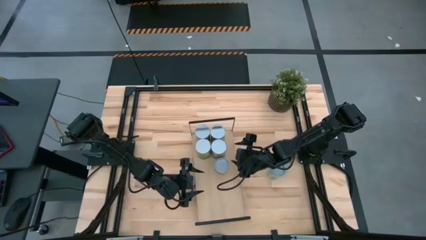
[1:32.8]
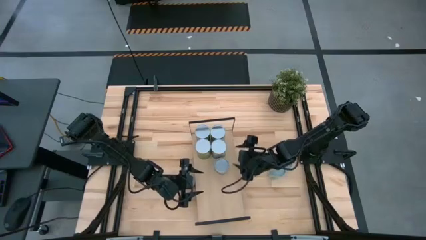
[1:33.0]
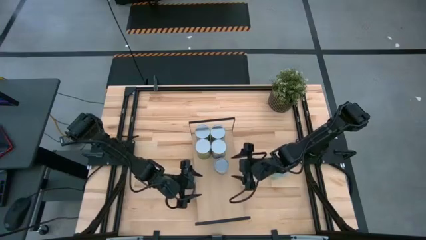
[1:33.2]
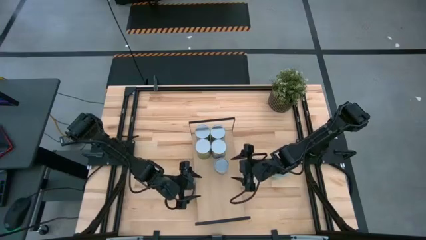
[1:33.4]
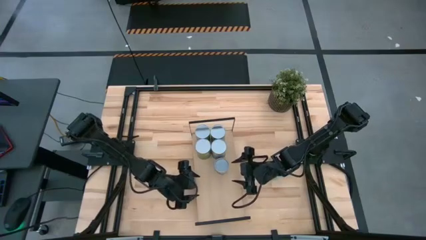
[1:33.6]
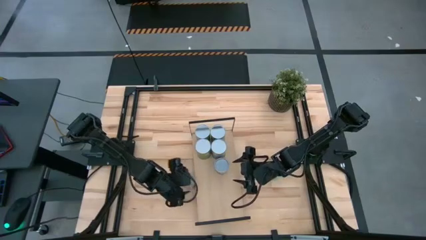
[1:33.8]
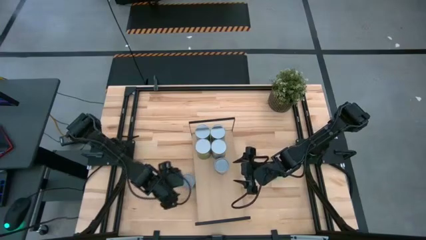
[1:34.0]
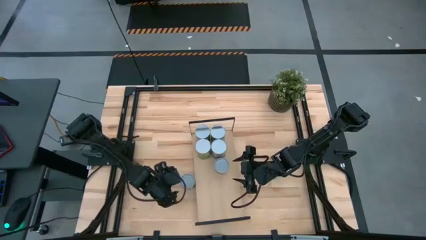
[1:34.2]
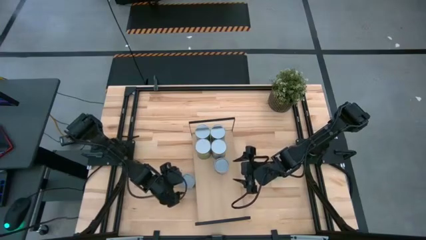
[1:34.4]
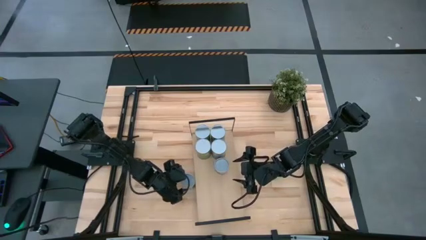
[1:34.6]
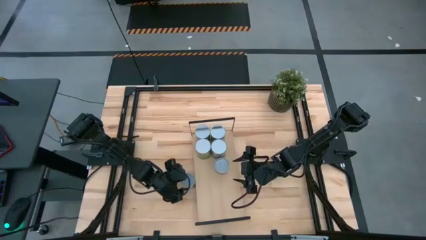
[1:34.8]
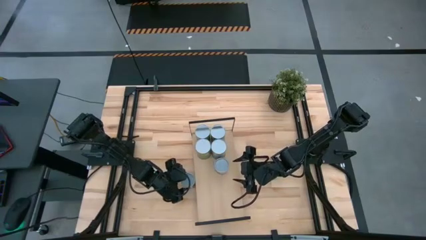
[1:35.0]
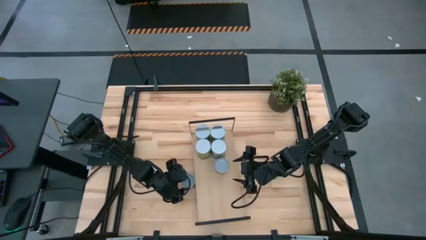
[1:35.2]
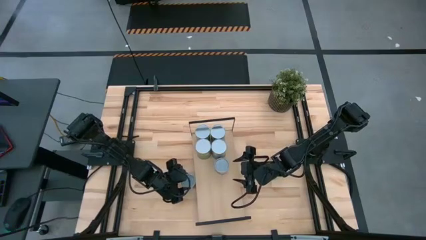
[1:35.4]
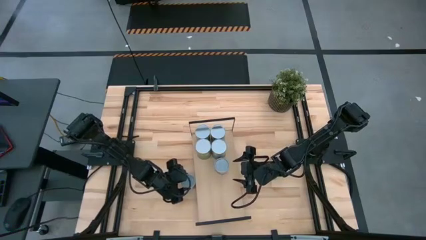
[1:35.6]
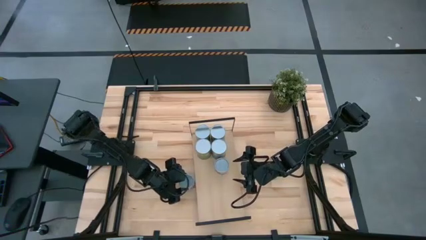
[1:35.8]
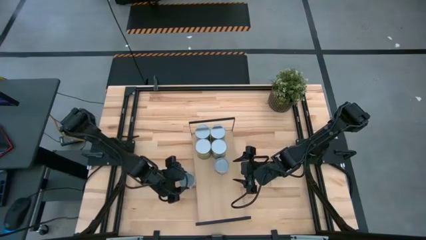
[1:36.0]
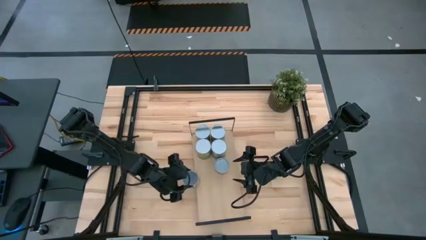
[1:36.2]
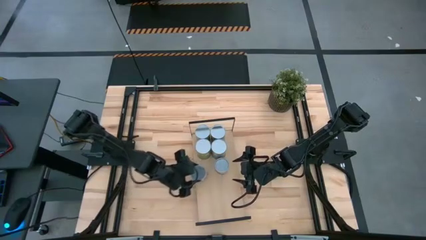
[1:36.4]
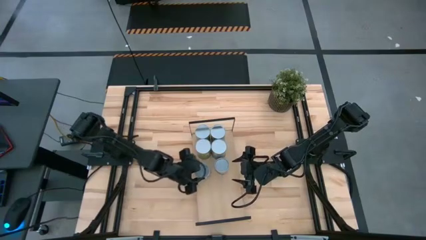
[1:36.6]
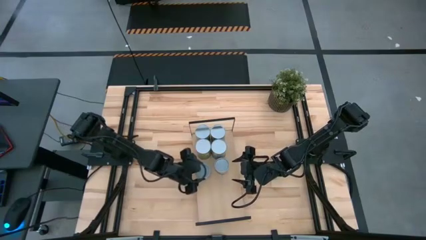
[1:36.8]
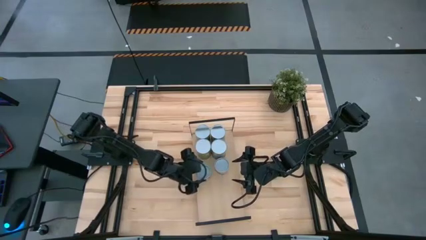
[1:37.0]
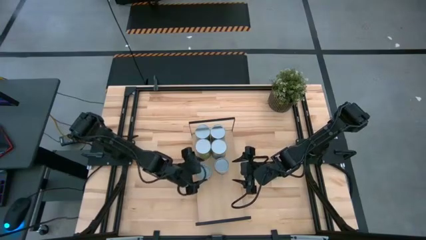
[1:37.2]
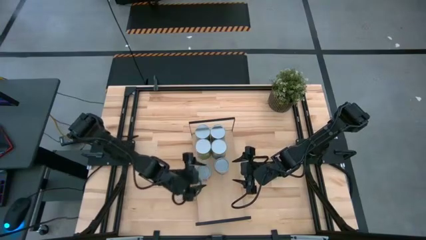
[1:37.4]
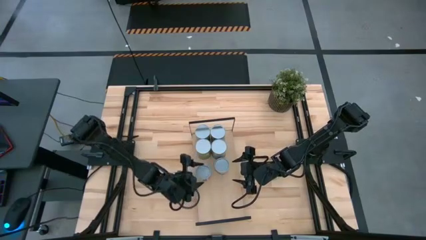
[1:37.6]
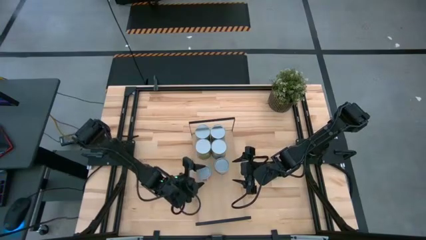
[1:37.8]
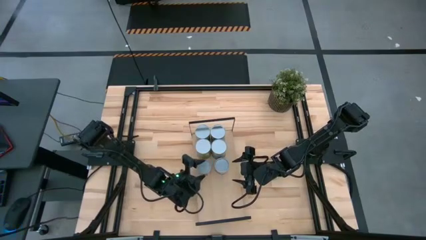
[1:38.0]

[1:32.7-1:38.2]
Task: Pick and place cans onto a shelf
Put the small canned tomatoes on the shelf

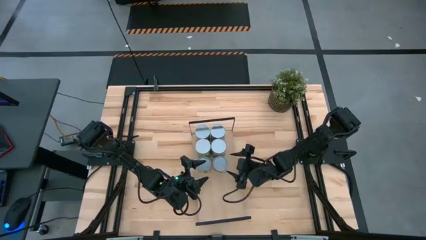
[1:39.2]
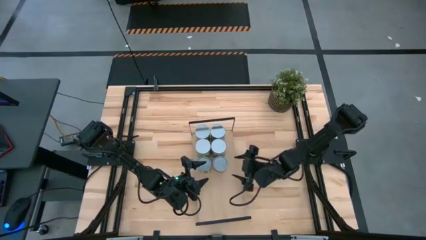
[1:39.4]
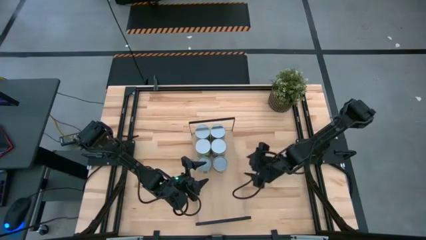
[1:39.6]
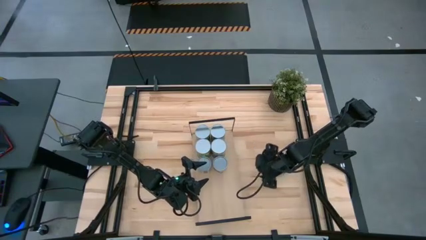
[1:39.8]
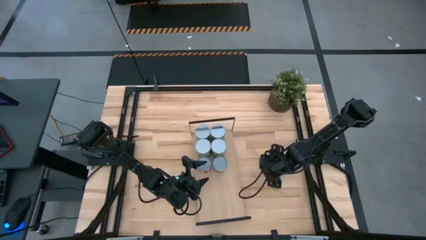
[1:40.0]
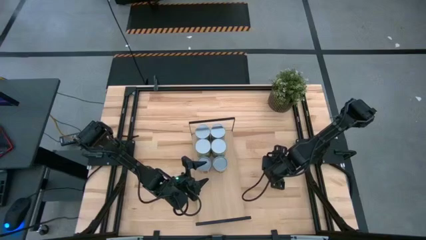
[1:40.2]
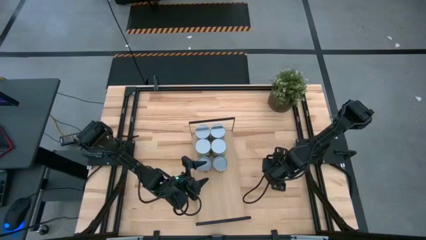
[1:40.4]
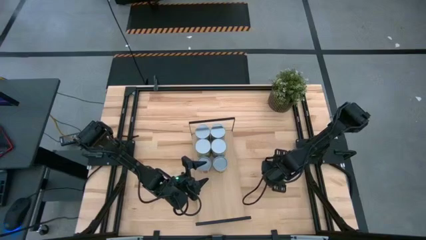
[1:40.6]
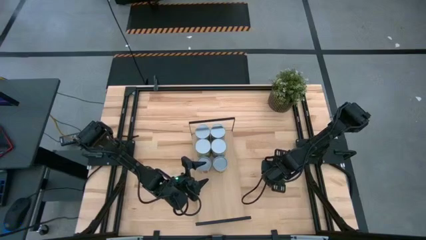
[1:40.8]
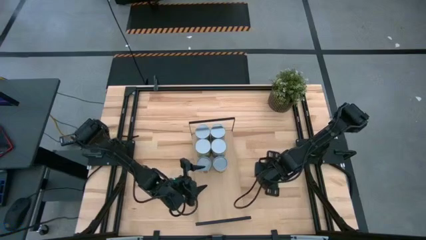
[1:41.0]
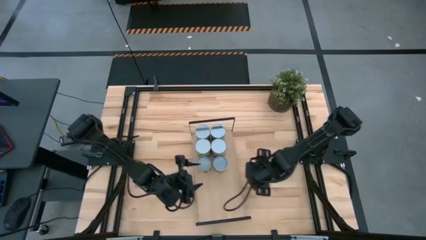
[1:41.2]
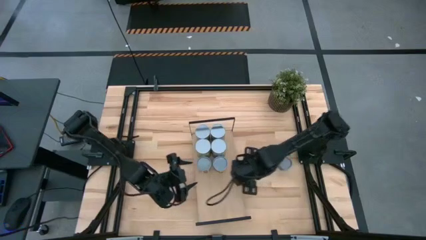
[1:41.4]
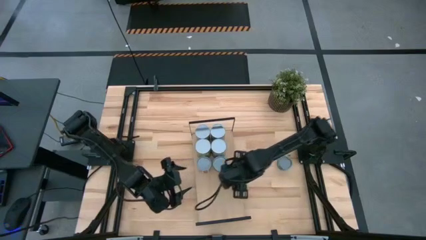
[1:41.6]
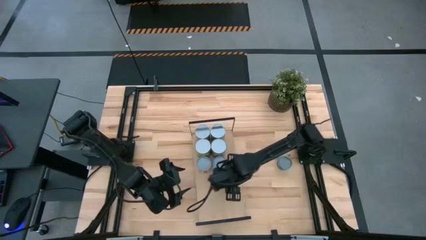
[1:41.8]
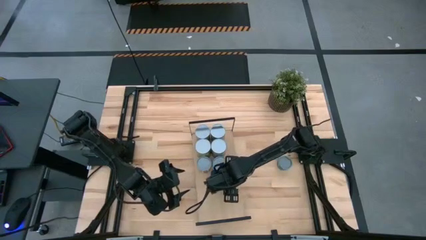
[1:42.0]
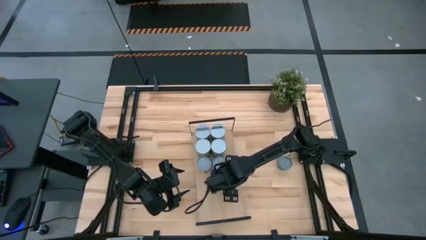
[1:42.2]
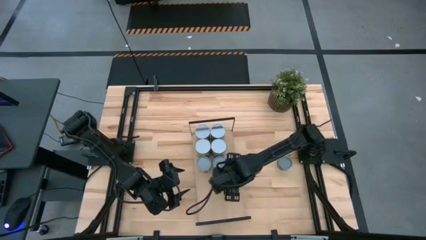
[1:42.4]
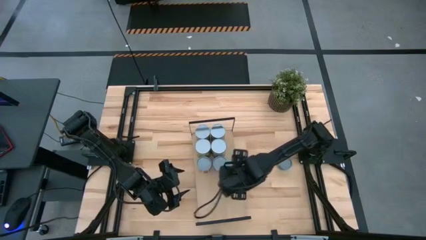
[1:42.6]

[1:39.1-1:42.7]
Put the large canned mixed vegetable on the shelf

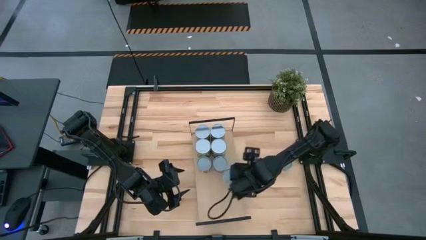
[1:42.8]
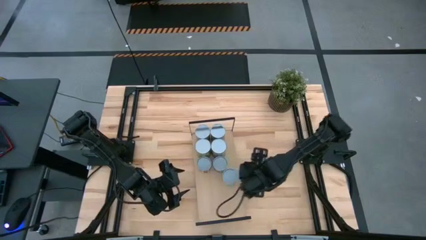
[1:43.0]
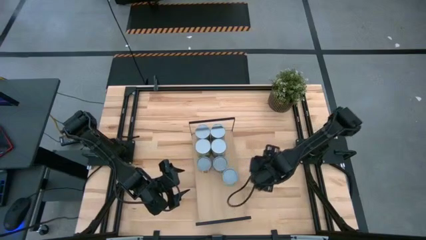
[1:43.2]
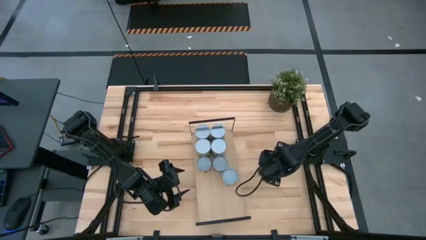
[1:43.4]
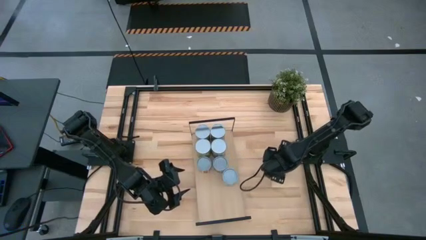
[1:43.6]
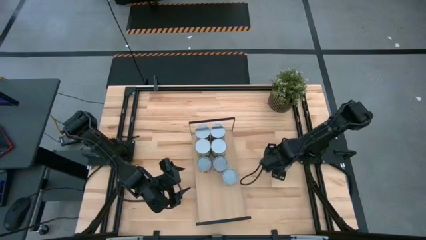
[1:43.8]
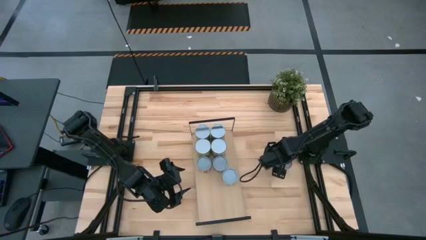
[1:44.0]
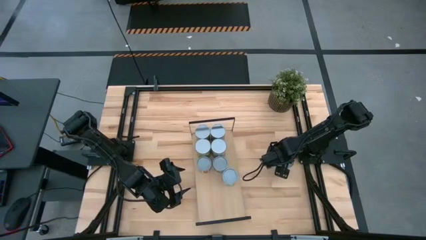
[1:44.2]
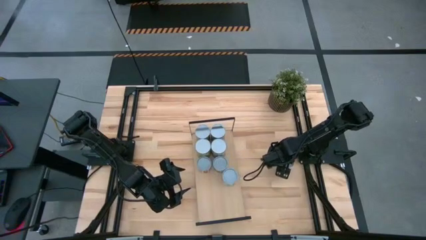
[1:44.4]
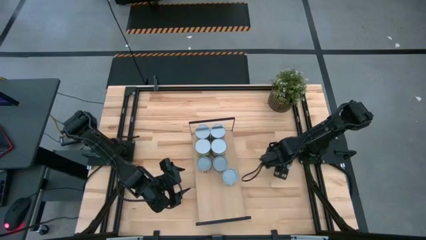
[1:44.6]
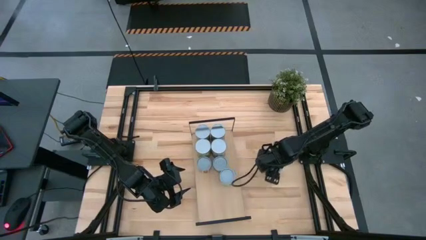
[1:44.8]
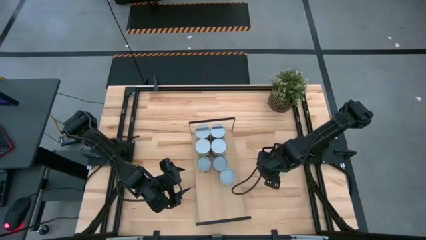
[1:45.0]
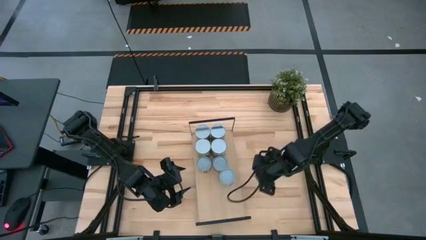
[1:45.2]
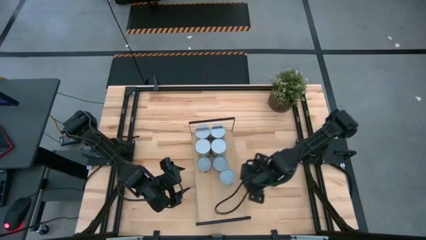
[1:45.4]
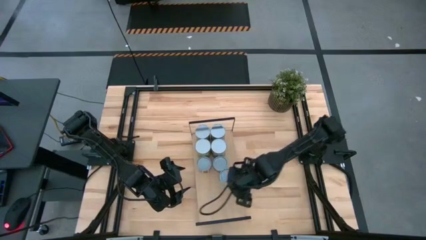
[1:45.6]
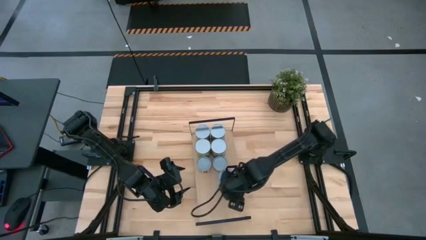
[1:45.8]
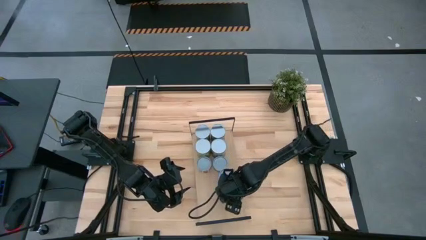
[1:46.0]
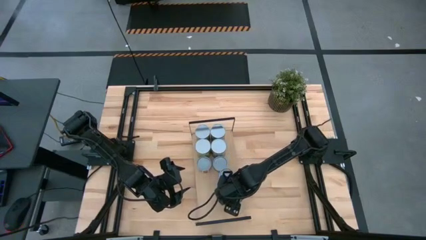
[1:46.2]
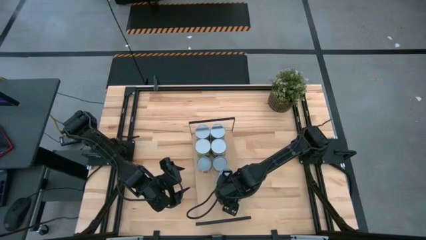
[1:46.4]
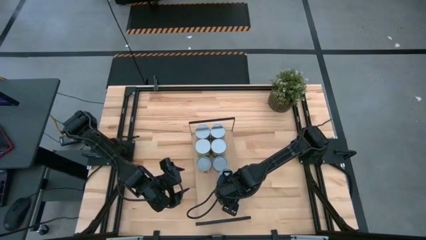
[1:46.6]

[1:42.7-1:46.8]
Put the small canned tuna on the shelf

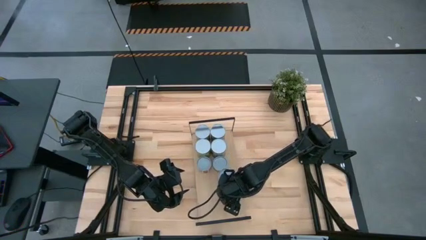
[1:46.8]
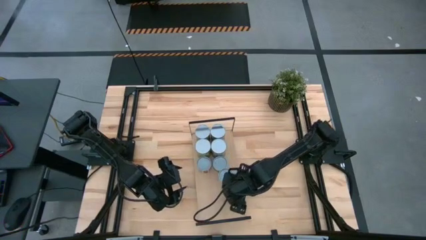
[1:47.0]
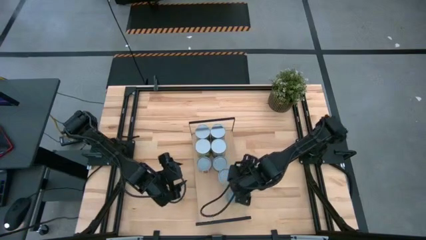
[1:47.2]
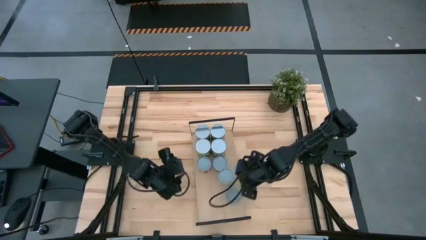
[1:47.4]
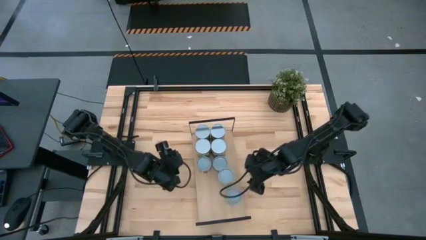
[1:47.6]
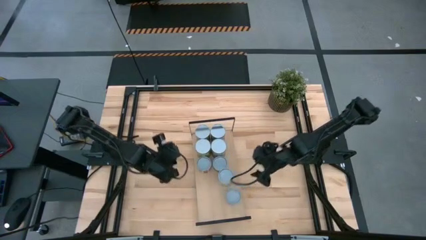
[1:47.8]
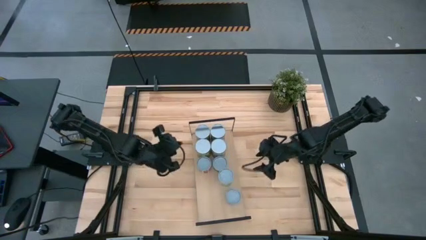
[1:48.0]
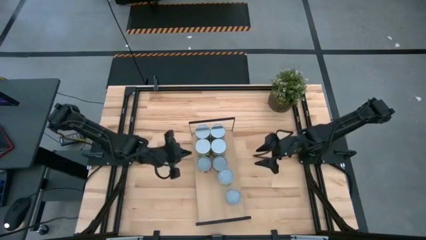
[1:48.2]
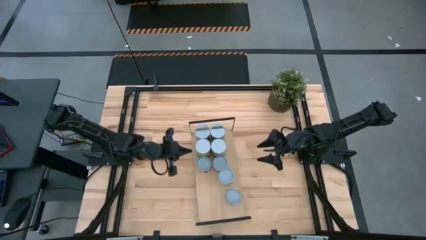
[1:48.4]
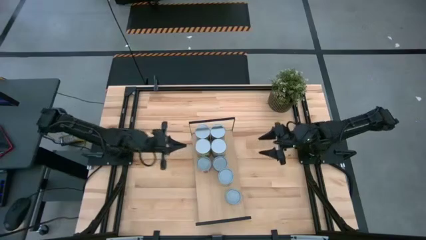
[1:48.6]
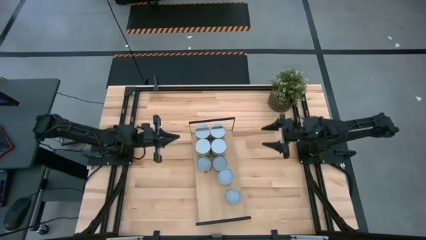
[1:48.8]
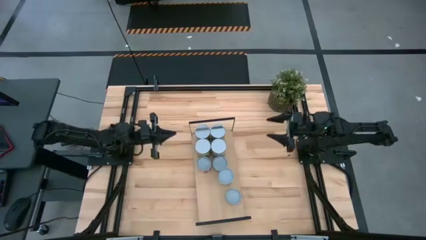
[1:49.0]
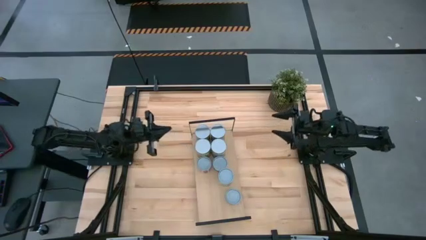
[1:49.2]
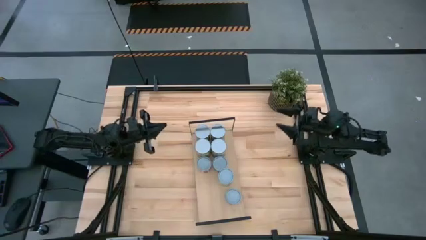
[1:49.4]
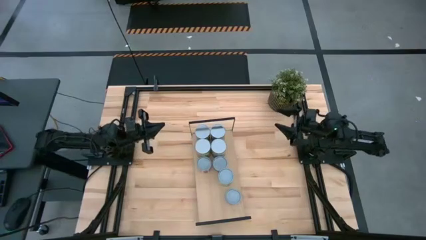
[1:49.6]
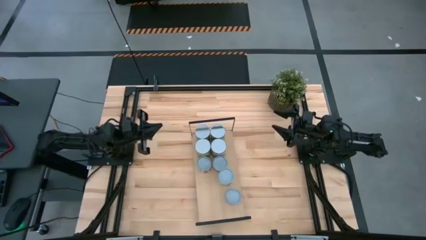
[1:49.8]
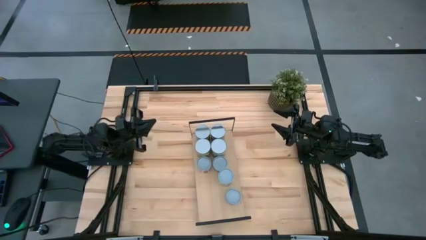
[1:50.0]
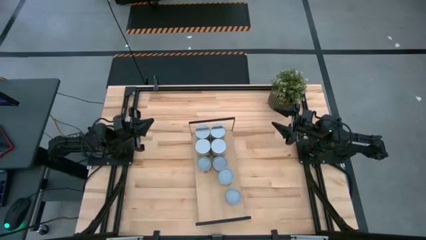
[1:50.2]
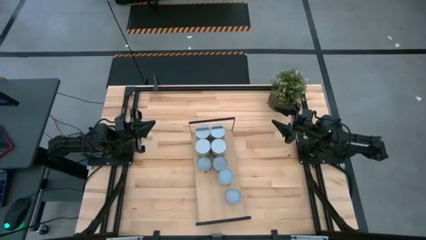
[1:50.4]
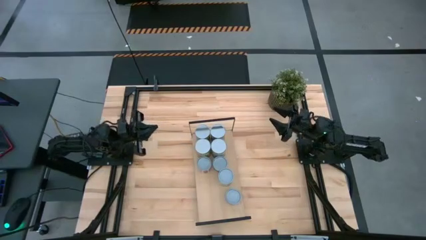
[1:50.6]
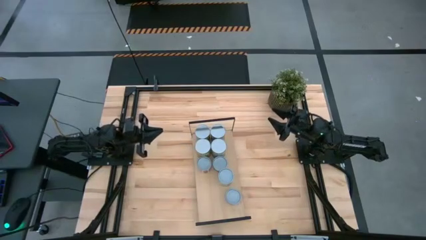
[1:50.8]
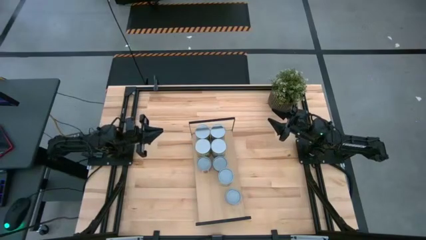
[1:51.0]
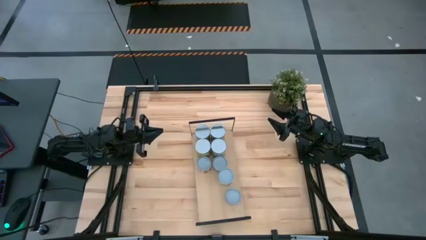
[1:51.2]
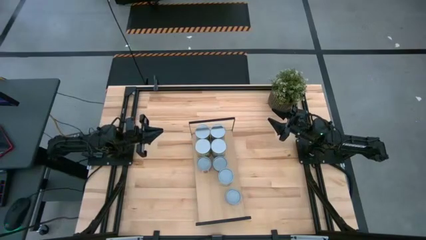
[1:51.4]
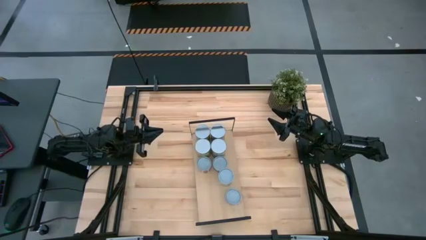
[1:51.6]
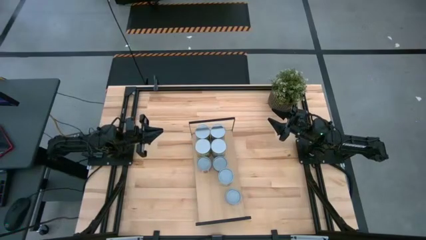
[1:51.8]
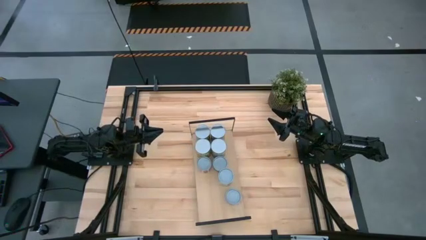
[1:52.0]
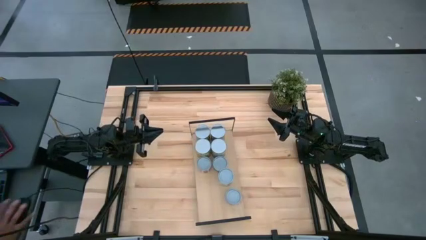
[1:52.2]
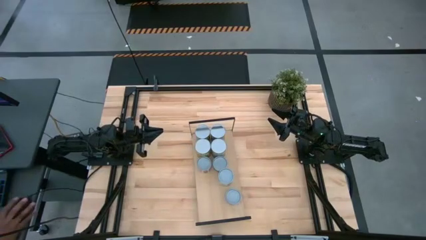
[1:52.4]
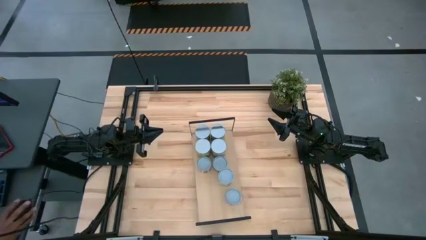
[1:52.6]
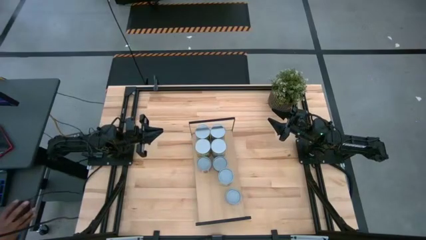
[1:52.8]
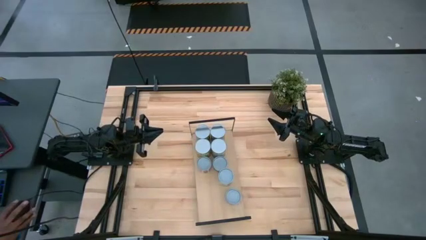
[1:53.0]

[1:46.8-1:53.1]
Return to Home Position
